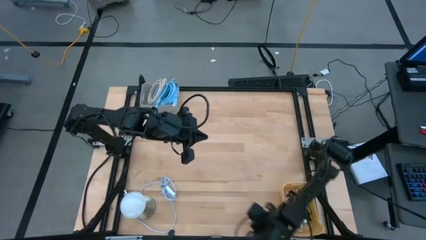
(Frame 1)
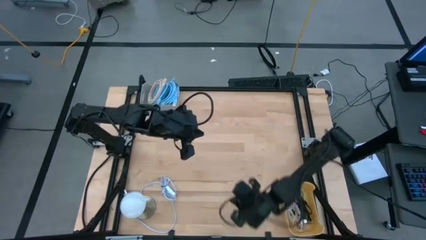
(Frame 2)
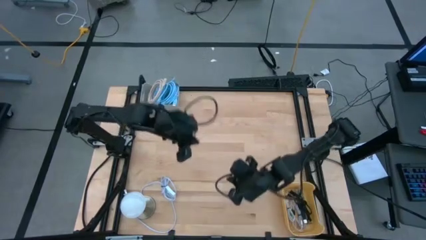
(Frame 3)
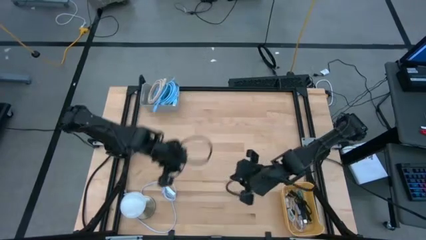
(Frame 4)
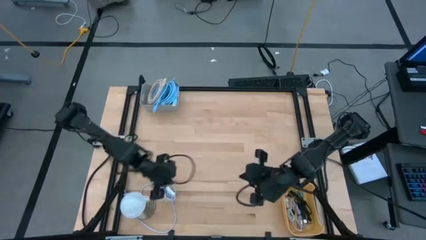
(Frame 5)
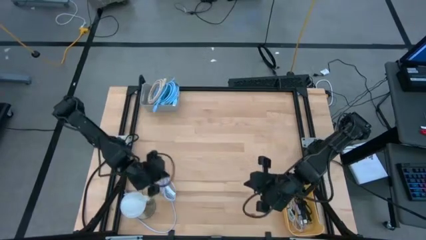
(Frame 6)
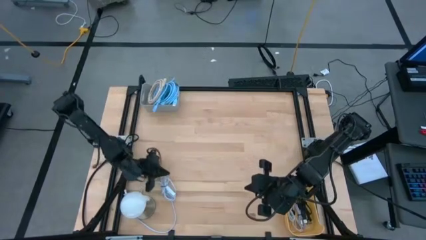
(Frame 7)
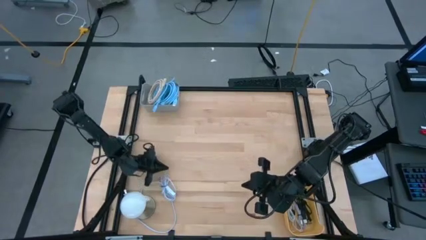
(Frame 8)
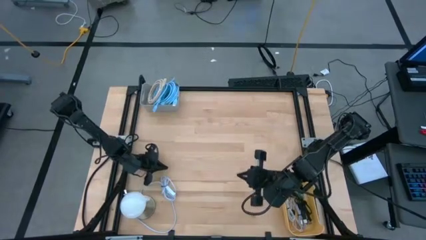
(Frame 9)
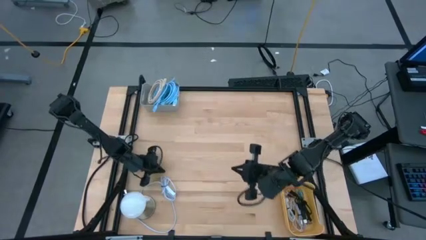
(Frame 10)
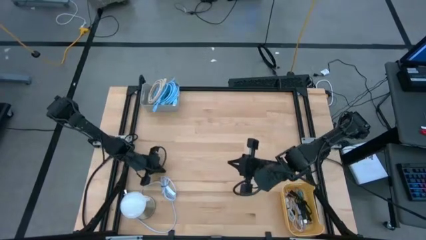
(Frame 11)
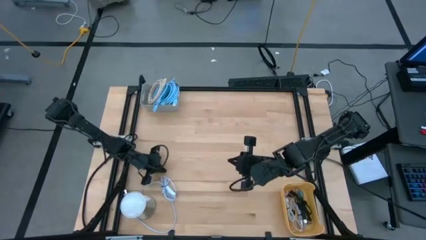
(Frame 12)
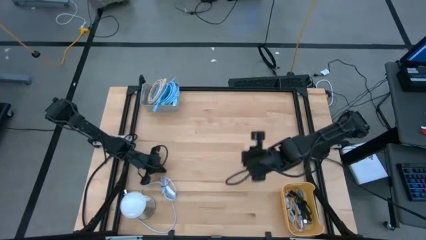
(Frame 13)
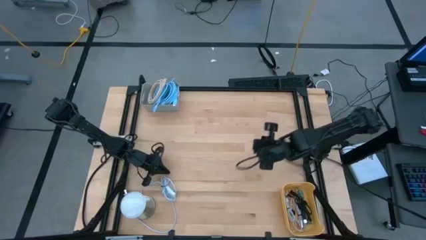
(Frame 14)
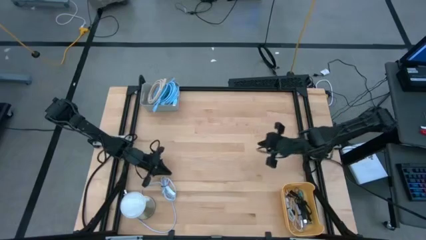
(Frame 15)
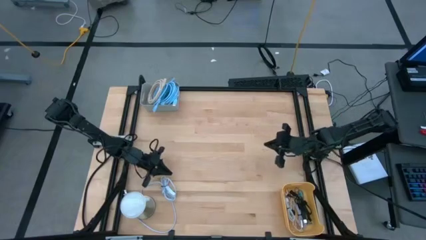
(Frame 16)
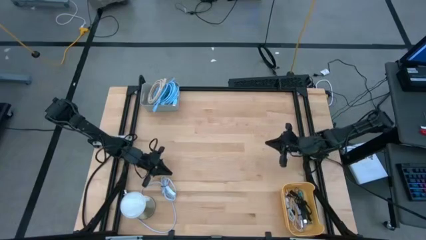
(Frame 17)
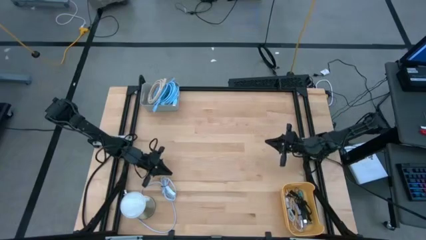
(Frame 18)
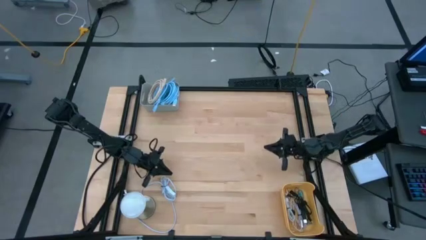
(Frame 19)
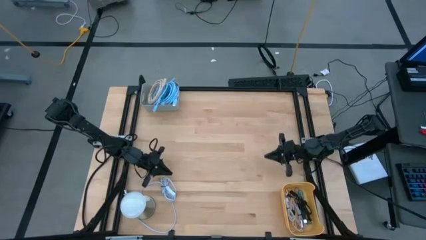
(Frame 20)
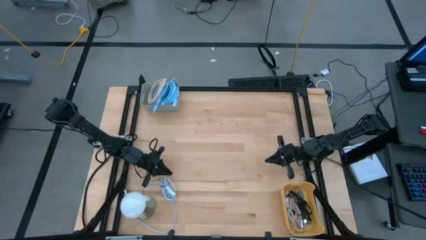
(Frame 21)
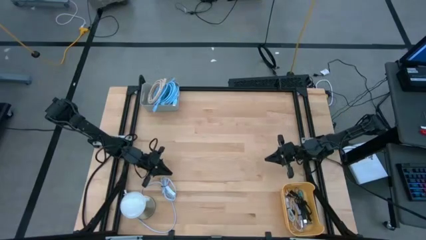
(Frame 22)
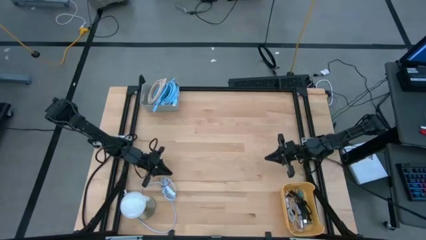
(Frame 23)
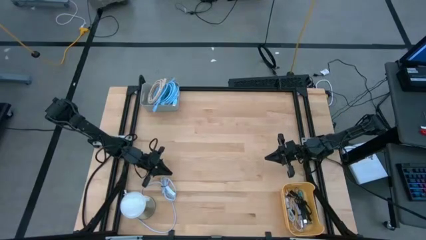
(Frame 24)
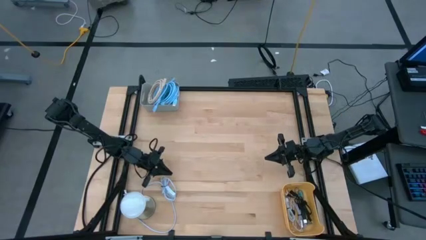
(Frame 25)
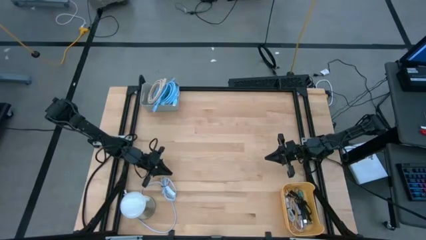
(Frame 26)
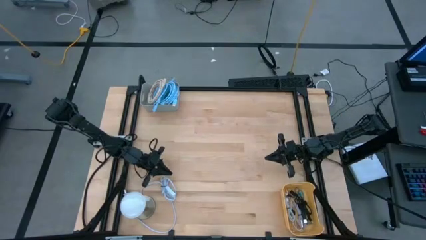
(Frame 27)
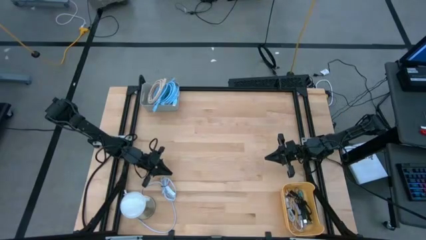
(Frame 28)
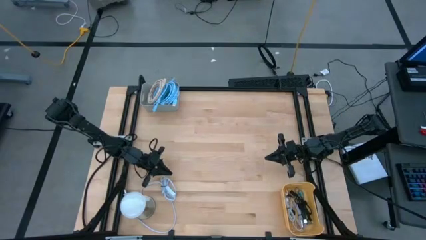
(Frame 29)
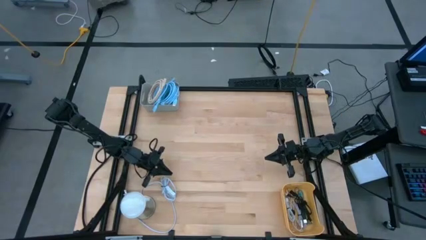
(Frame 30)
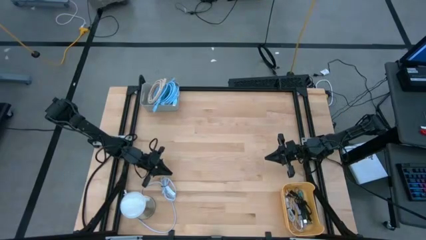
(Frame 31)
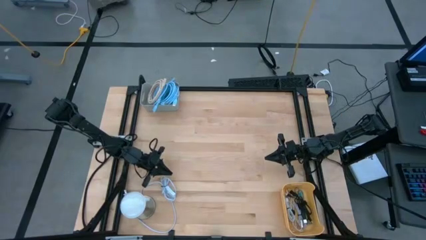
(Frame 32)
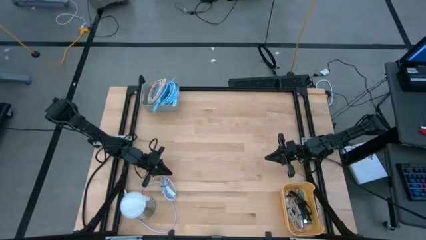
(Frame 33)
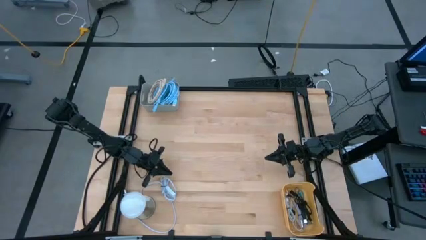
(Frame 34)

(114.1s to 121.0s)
Task: Pick & Place USB Port
Return to Home Position

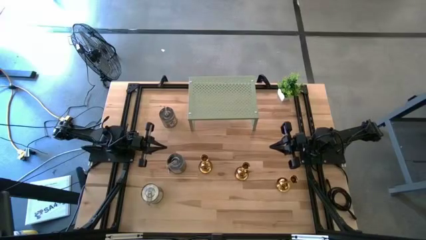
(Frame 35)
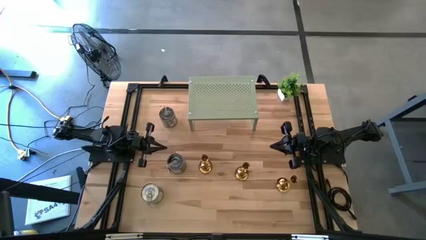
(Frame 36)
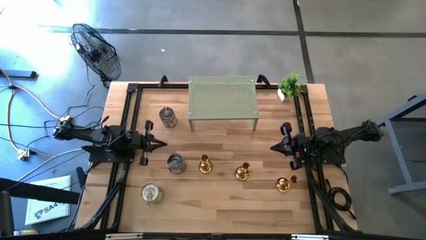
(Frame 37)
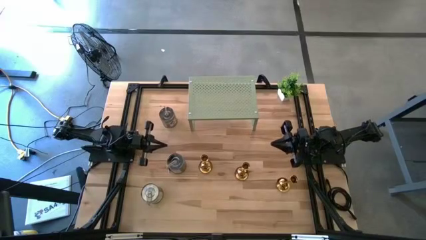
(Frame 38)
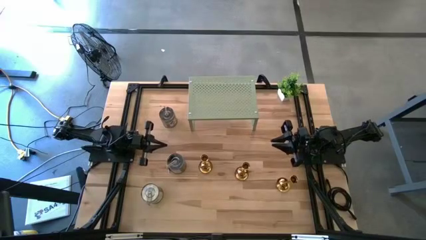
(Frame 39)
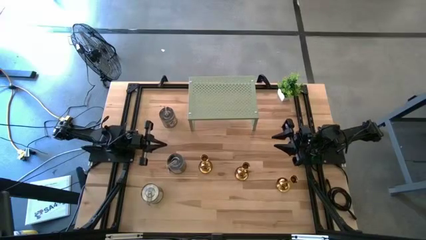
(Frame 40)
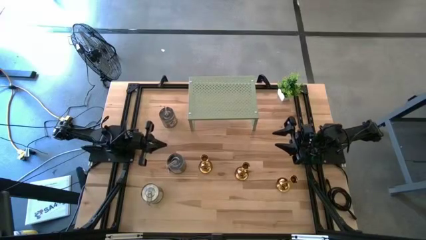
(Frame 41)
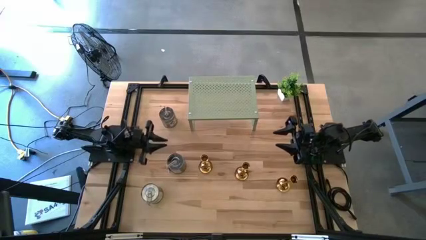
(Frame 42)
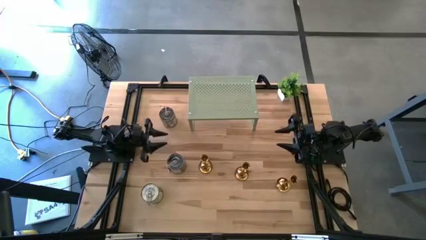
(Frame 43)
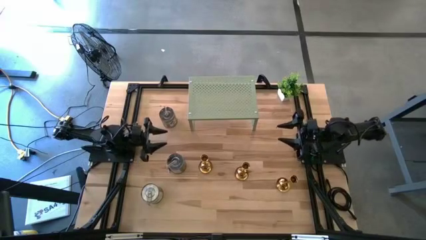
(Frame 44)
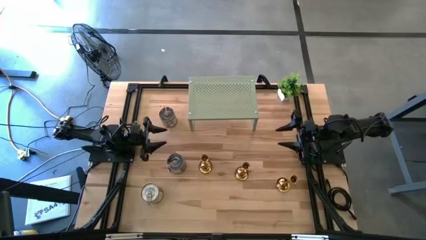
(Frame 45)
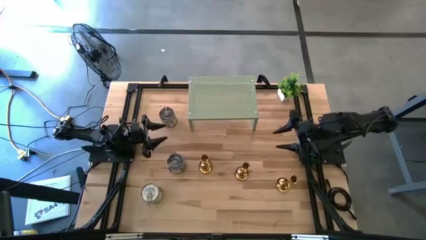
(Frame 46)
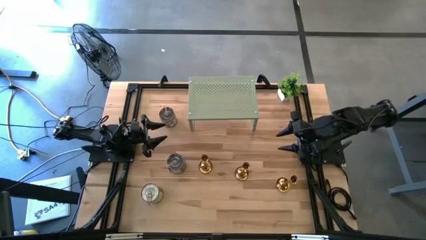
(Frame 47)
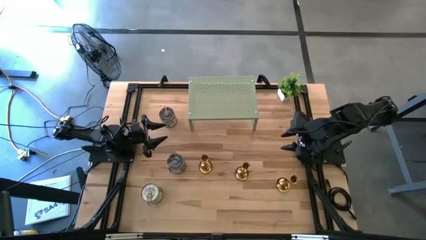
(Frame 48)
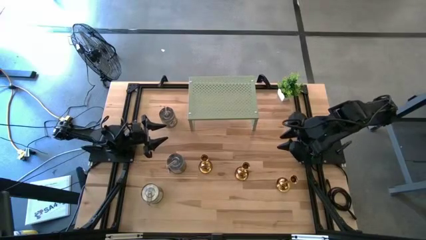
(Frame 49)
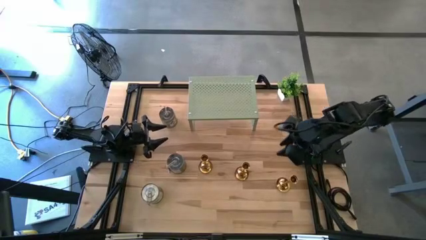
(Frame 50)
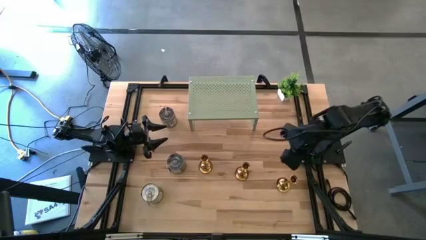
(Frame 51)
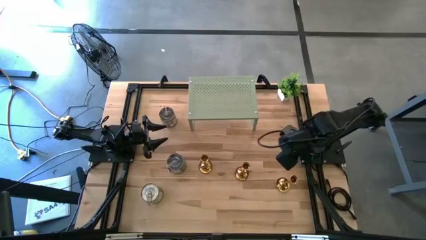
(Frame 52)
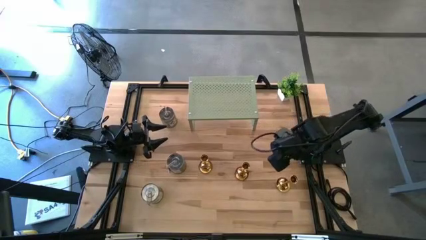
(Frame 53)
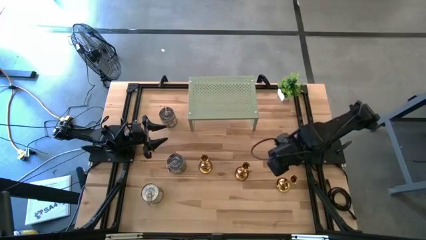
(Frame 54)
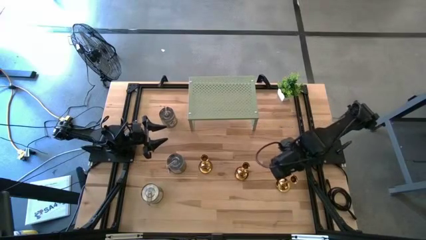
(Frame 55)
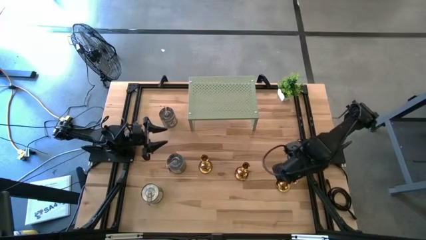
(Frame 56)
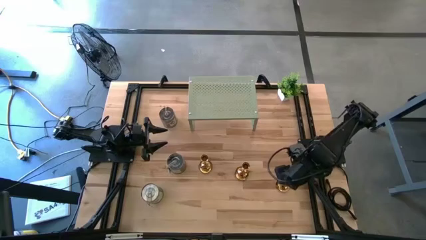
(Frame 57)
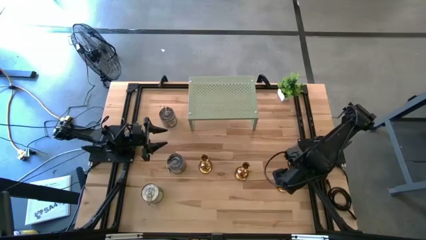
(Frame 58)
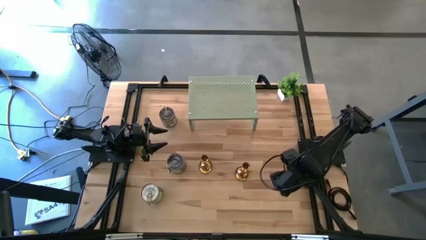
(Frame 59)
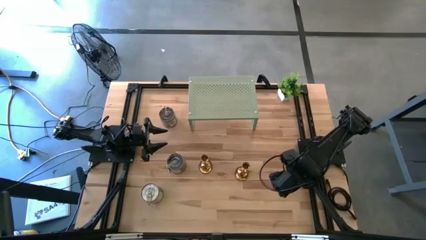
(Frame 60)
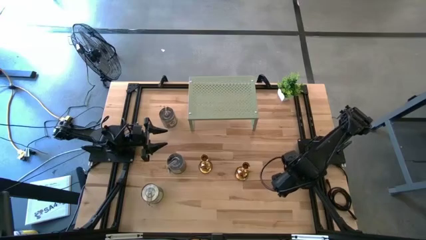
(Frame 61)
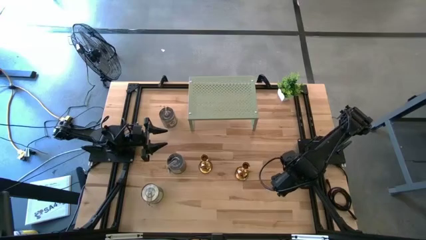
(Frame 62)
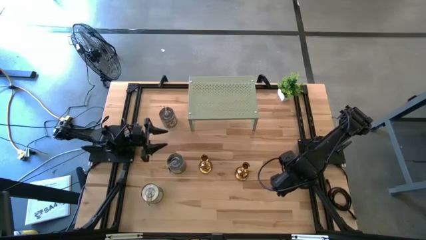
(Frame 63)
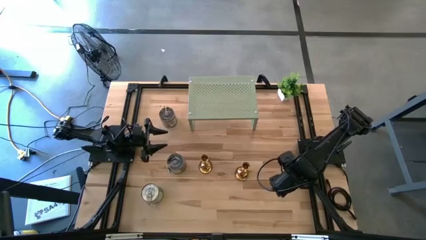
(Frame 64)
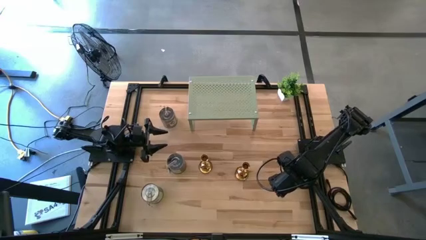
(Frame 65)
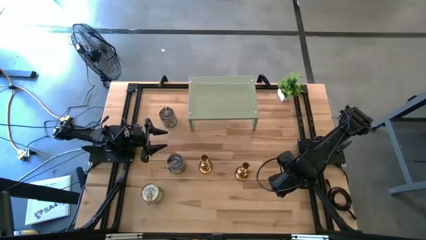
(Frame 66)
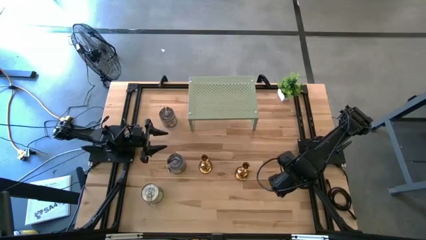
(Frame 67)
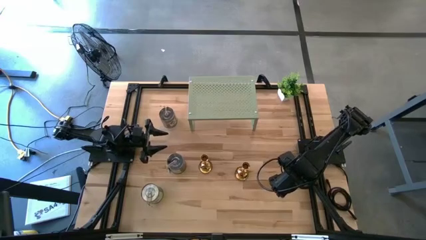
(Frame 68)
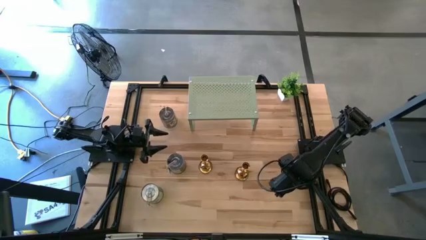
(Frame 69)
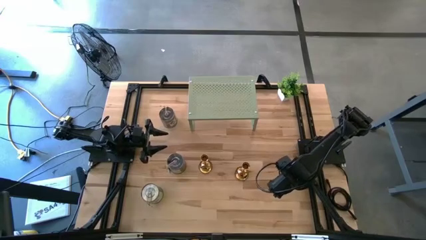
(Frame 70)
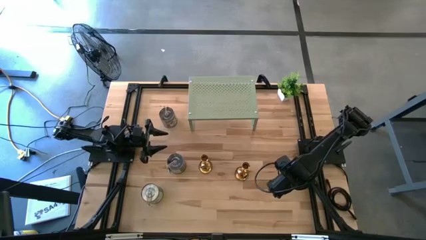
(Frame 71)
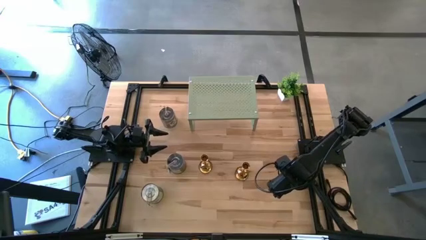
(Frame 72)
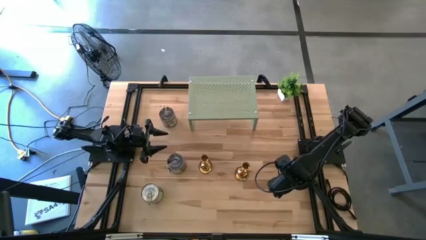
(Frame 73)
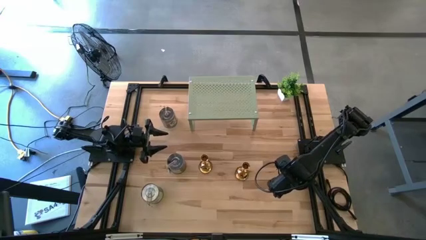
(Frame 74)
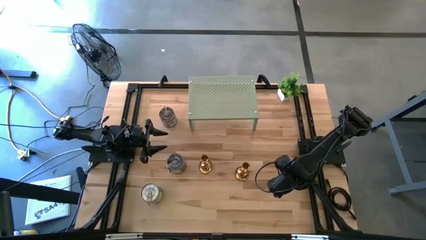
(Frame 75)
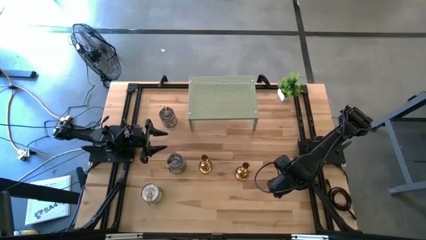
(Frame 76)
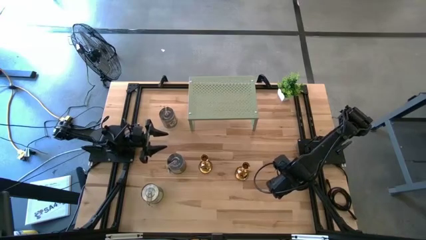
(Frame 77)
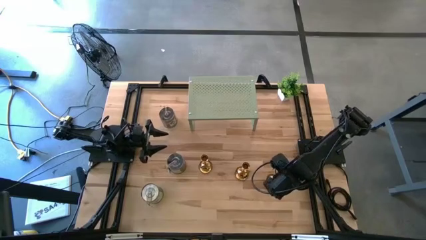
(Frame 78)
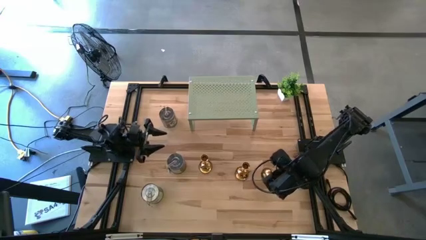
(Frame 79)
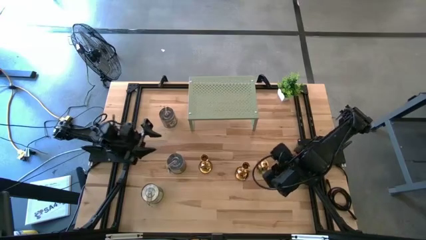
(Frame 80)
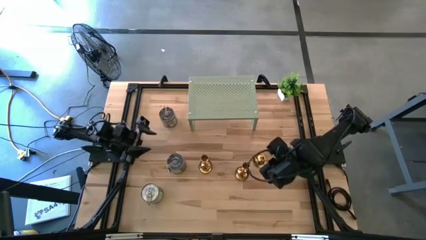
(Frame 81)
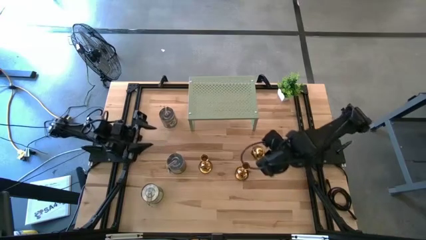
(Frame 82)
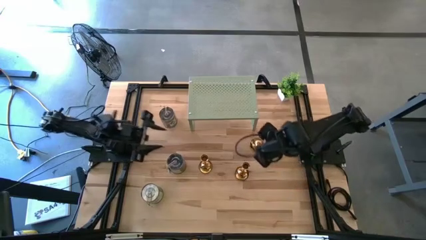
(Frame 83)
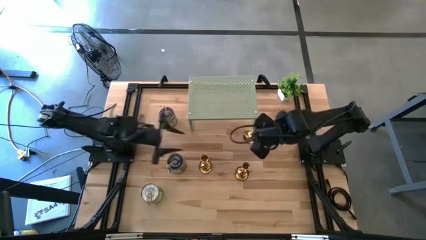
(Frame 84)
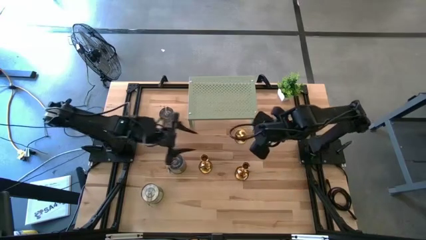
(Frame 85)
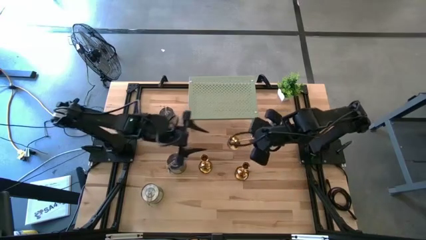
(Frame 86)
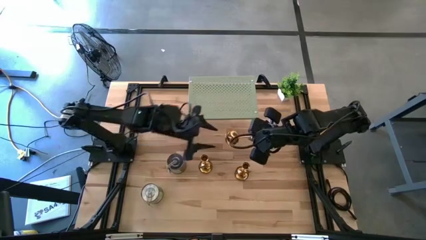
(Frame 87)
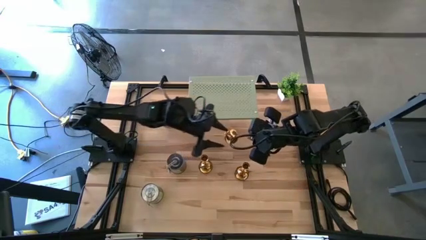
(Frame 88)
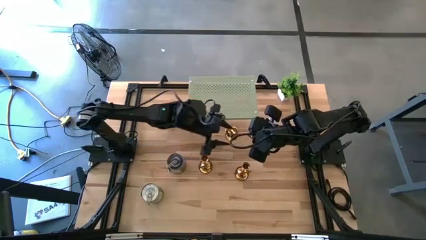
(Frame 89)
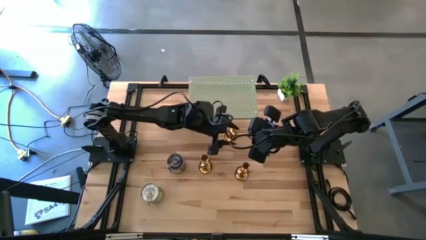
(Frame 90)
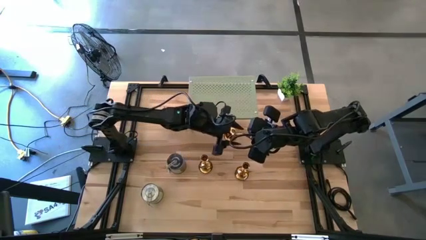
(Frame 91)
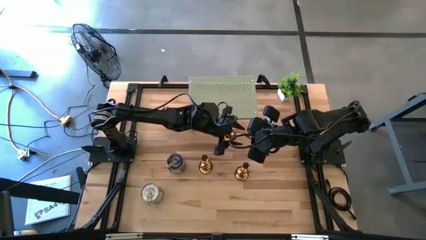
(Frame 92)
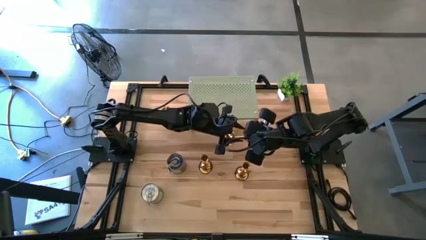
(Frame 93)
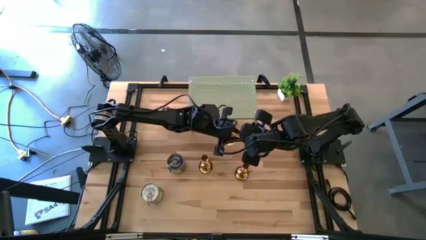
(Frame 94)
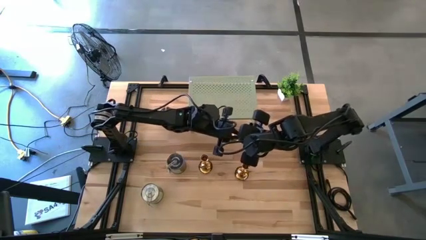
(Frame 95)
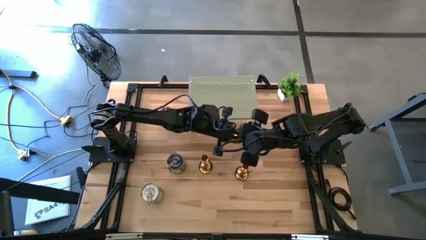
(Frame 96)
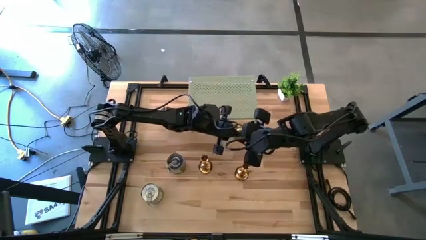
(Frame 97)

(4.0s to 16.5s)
Task: Pick & Place candle stick holders
Put the right gold candle holder on the shelf
